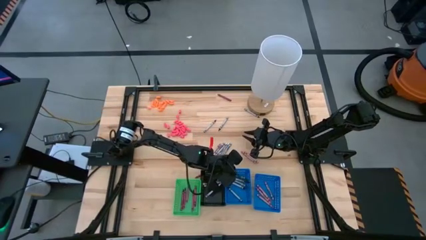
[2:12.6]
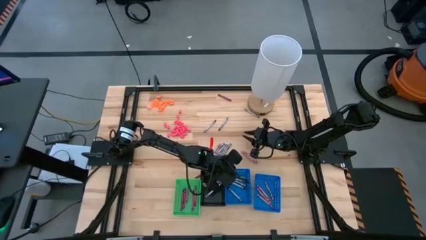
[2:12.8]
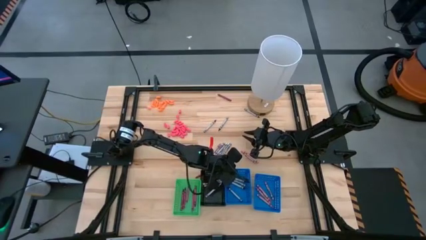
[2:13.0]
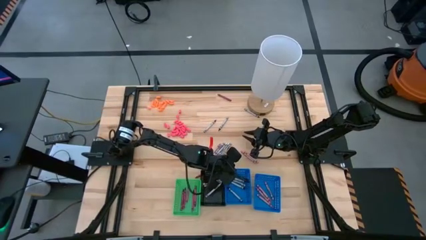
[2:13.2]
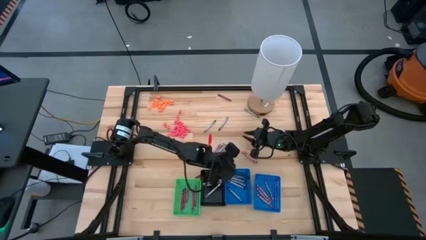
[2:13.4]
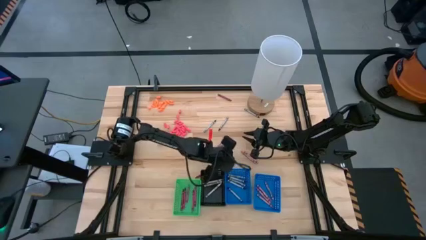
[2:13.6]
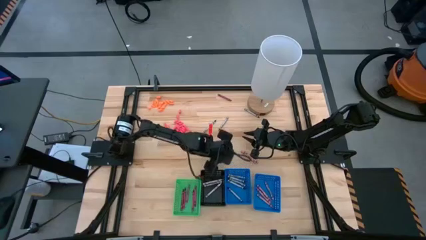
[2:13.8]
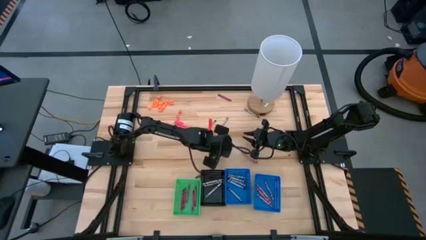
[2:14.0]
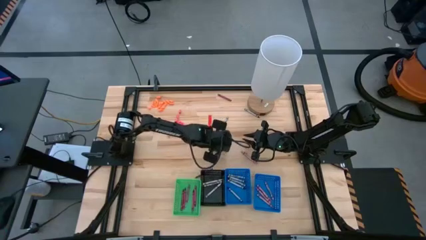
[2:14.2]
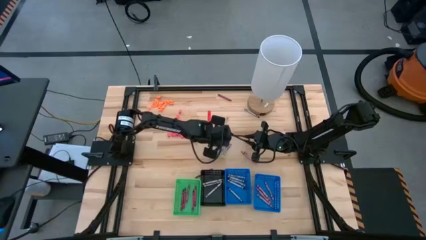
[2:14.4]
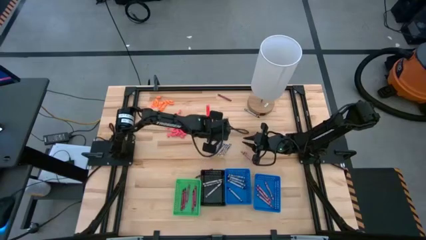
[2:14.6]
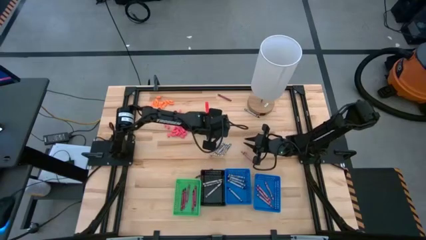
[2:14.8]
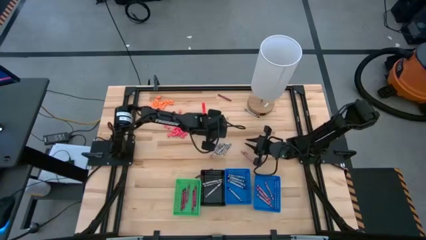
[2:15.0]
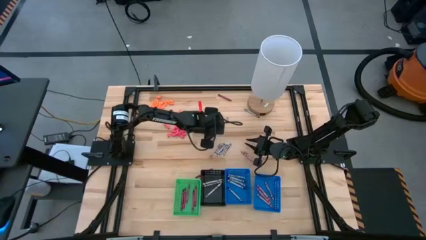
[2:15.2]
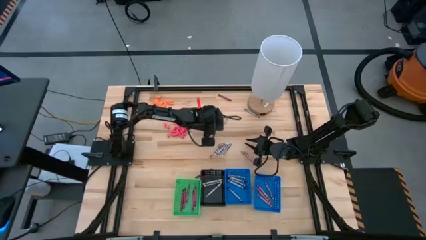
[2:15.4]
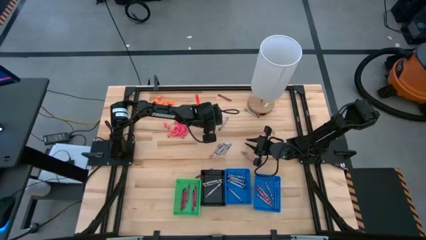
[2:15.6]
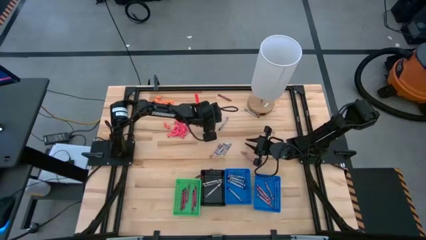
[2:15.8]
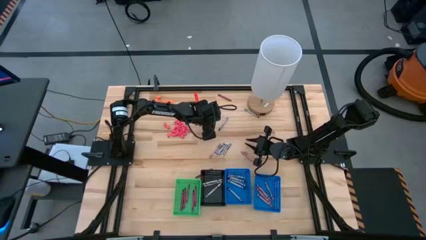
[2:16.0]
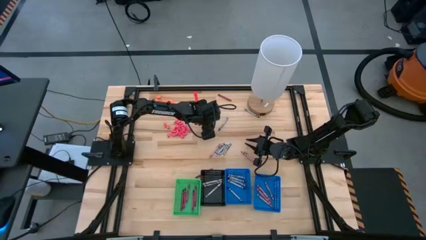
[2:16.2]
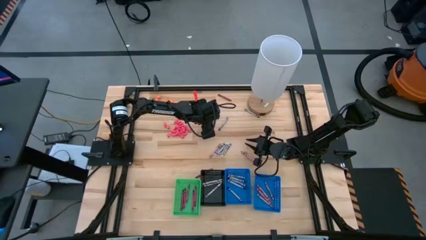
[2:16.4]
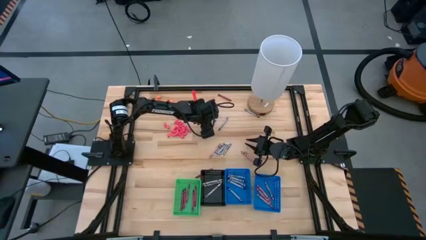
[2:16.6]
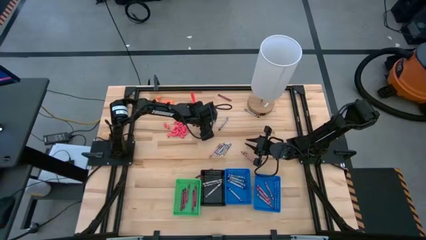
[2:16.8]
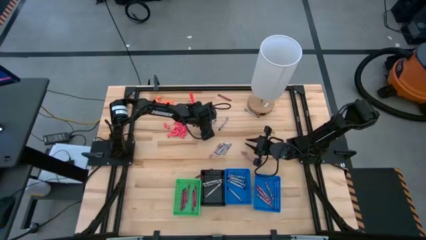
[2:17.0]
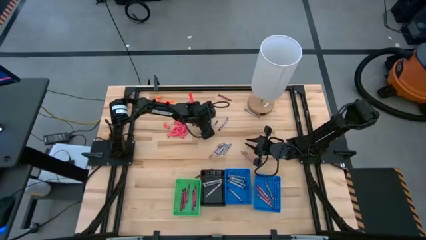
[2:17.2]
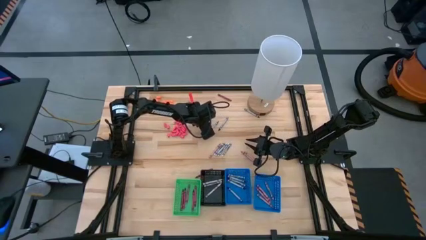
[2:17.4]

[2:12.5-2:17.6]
Task: Sort crayons
Put the black crayon into the left blue bin

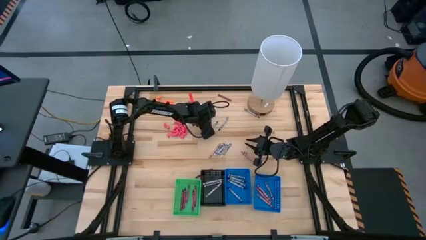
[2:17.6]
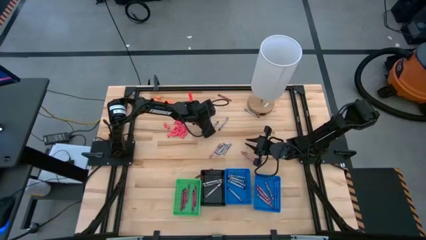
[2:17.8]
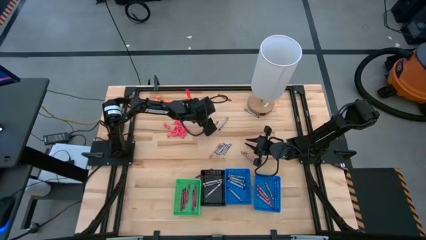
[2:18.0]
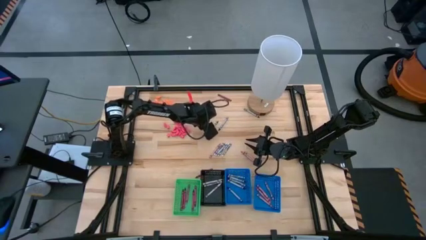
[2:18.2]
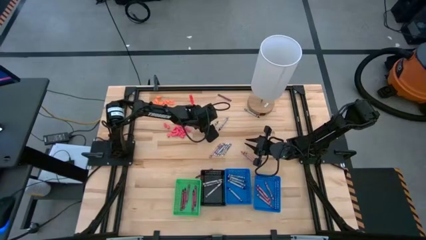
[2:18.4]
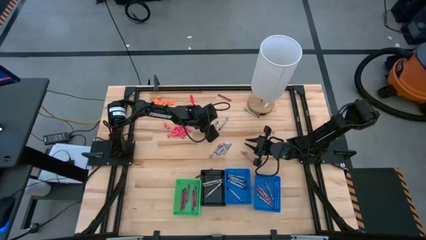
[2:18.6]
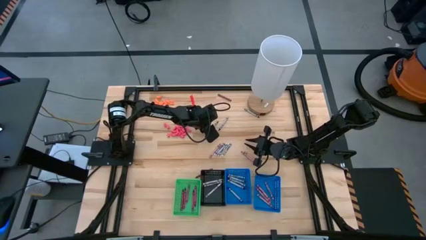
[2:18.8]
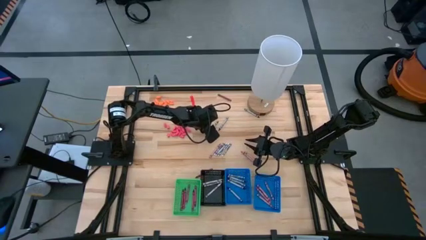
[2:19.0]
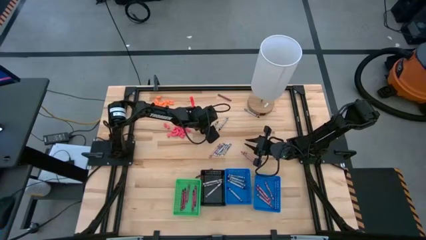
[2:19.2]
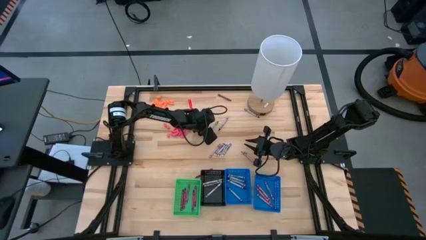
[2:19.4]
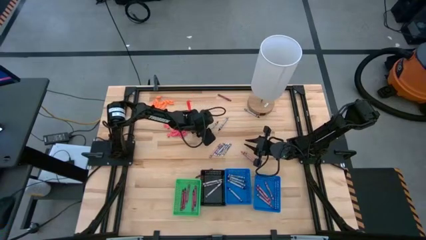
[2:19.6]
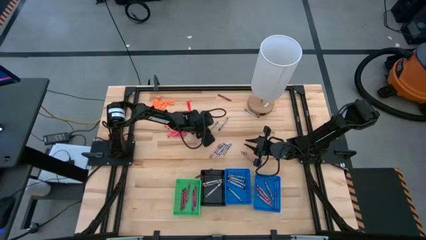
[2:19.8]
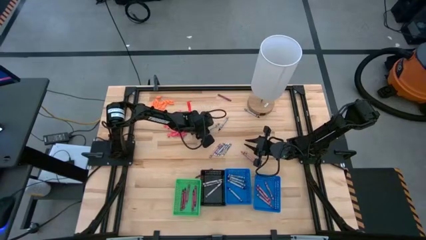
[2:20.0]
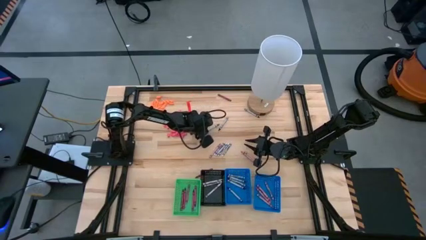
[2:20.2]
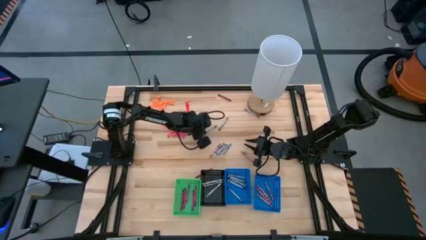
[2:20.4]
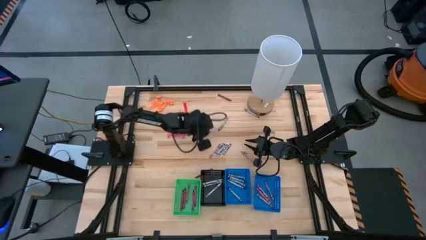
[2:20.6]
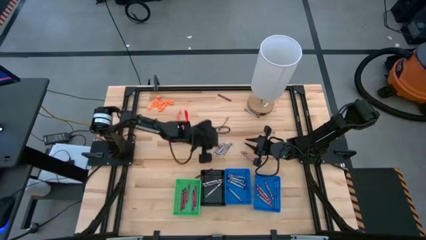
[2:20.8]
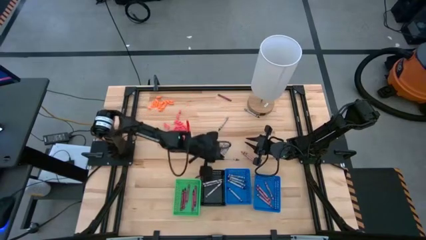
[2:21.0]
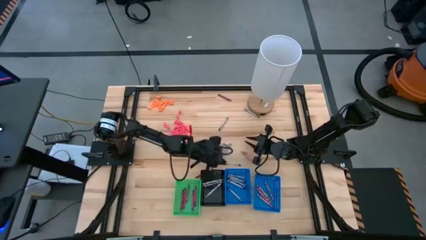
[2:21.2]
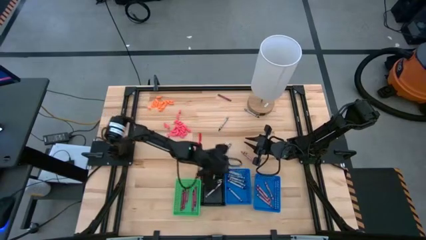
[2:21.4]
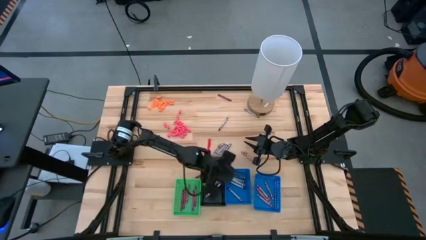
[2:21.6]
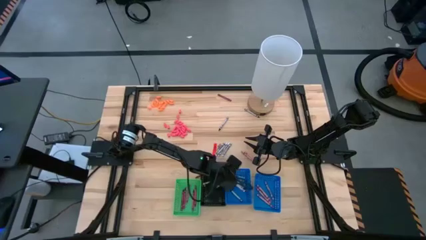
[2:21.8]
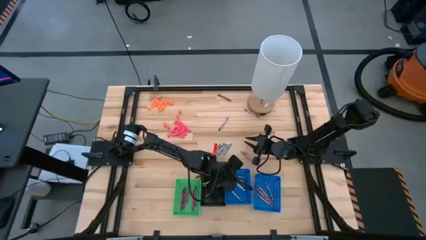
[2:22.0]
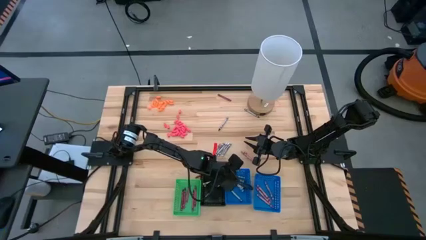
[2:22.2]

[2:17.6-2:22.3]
Put the black crayon into the left blue bin

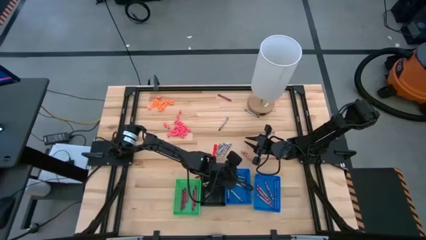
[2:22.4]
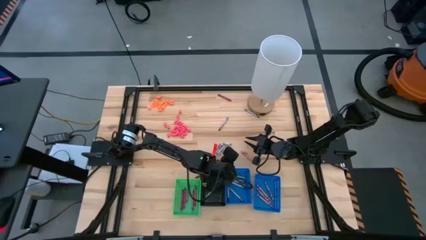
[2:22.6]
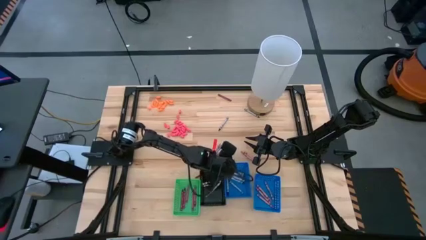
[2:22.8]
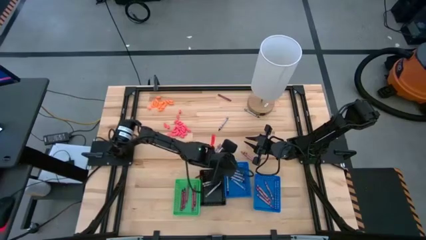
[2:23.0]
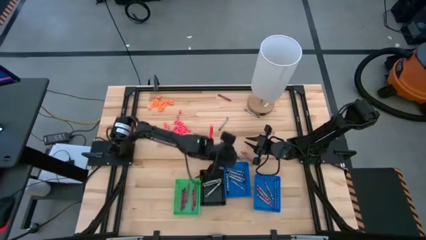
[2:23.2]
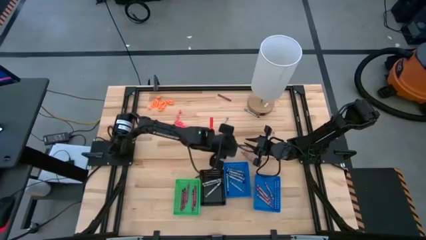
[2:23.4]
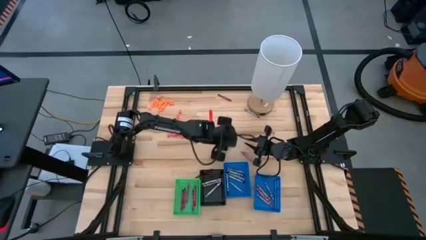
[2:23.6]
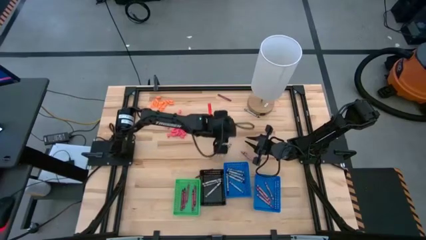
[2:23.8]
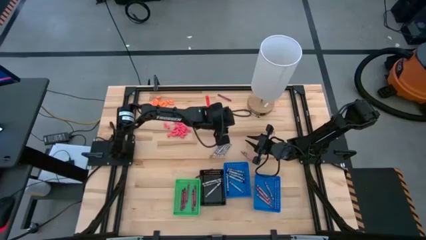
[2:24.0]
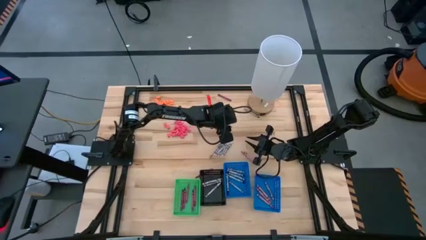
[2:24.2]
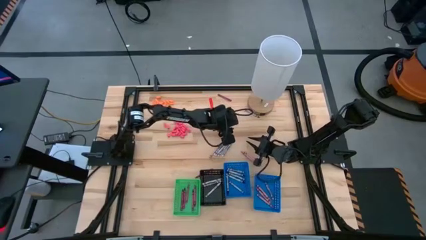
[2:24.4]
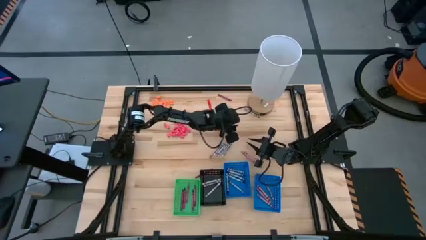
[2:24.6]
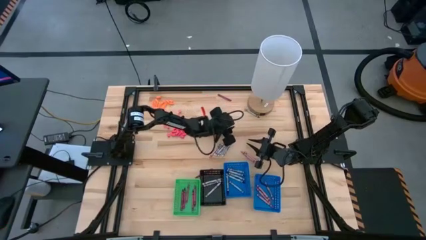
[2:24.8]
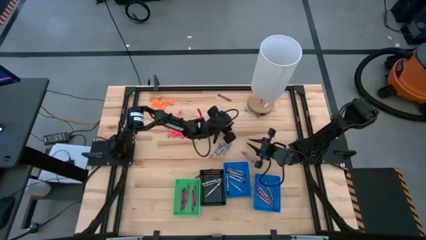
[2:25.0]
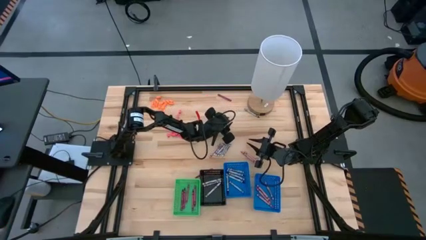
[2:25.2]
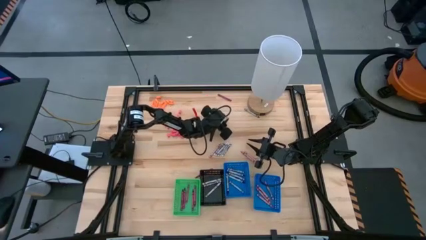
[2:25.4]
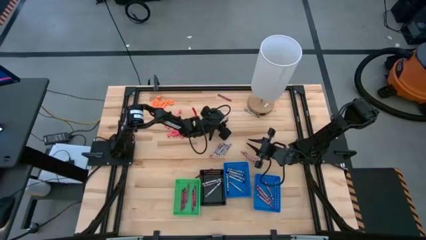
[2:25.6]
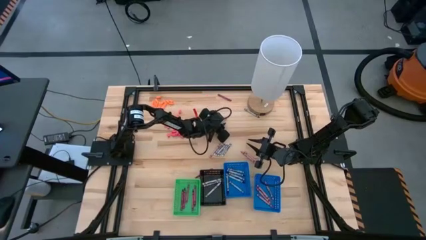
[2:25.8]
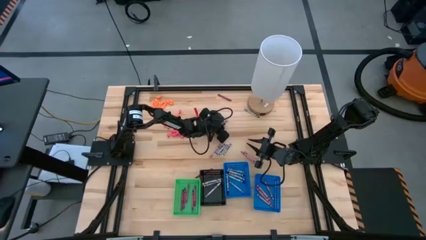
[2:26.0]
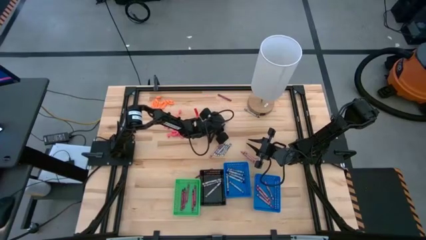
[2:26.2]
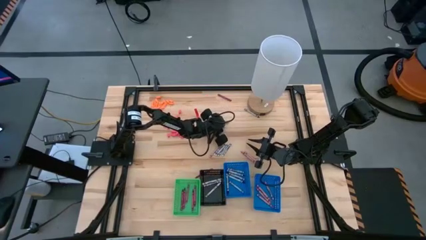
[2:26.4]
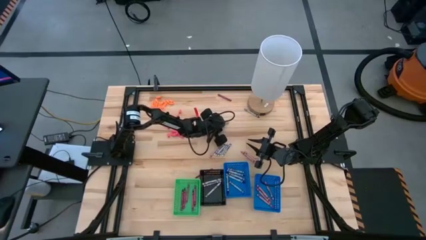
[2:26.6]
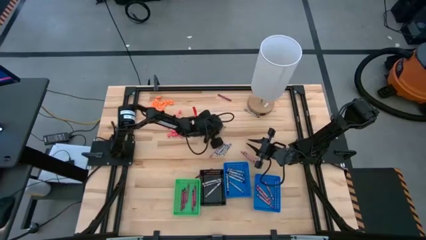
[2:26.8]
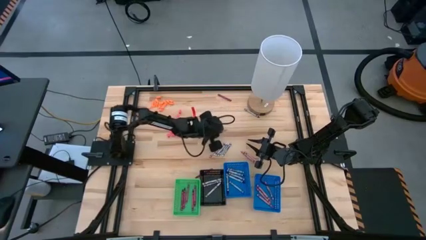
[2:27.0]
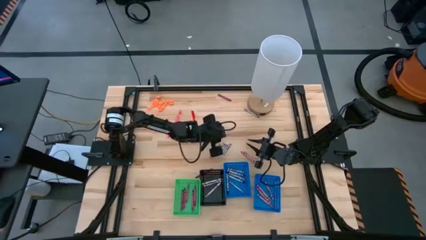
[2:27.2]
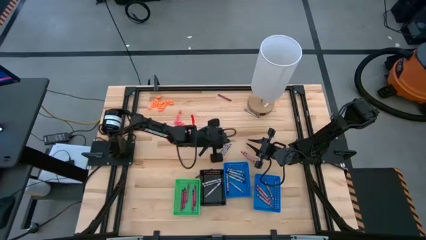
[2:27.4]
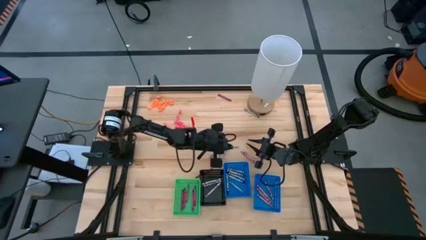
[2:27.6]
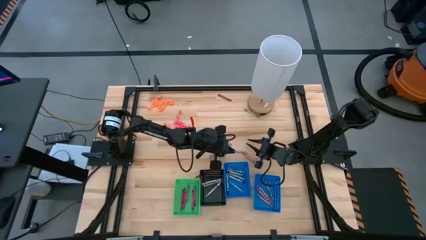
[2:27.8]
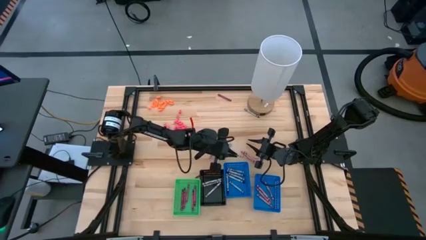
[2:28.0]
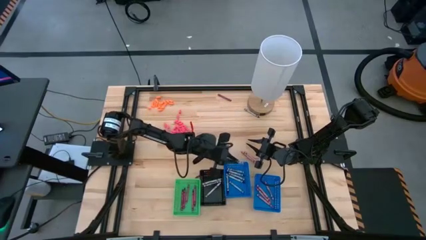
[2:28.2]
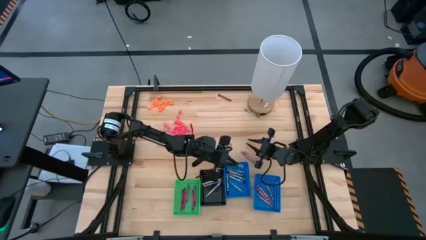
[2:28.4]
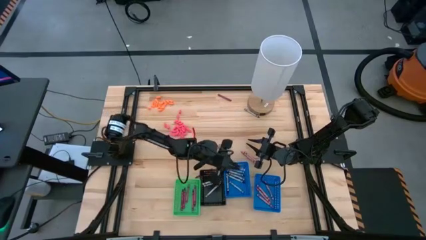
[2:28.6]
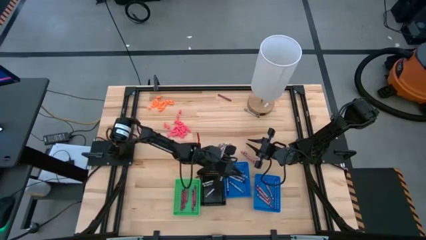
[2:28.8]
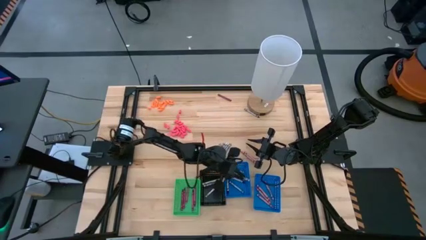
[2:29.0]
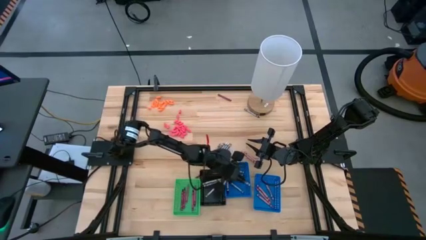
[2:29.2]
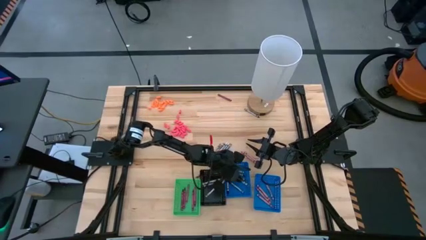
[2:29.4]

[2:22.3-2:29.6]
Put the black crayon into the left blue bin
